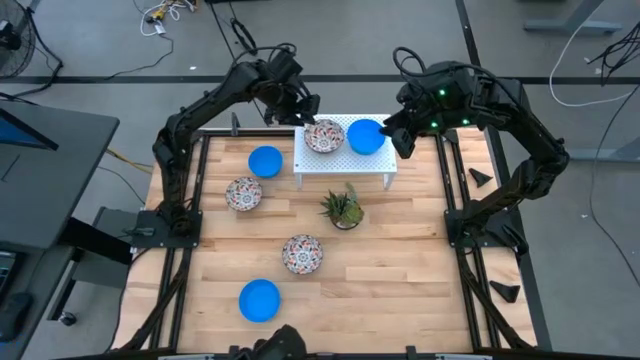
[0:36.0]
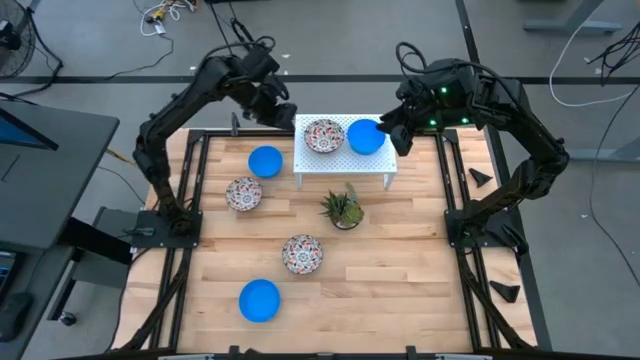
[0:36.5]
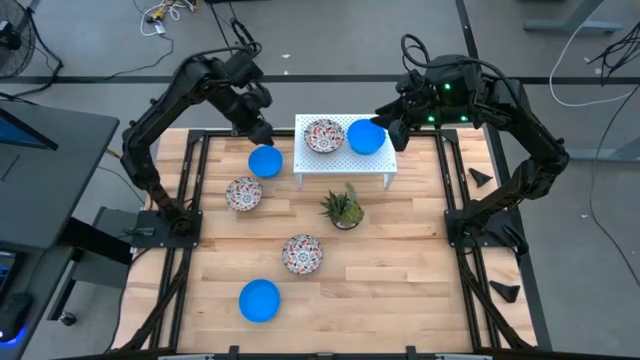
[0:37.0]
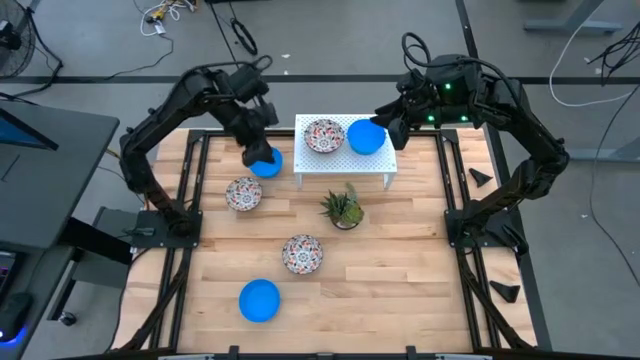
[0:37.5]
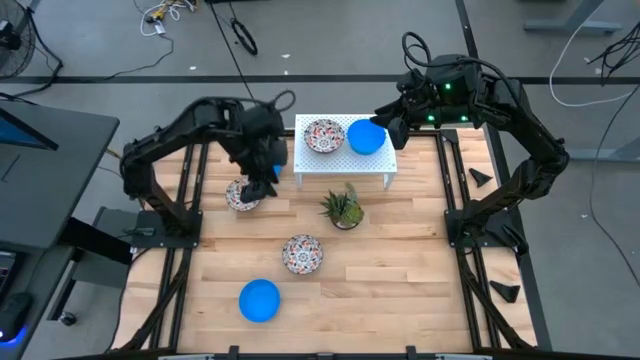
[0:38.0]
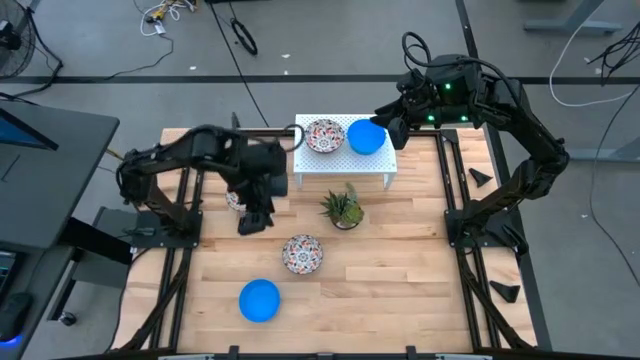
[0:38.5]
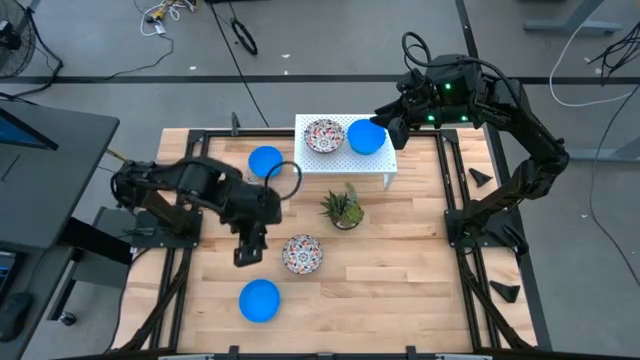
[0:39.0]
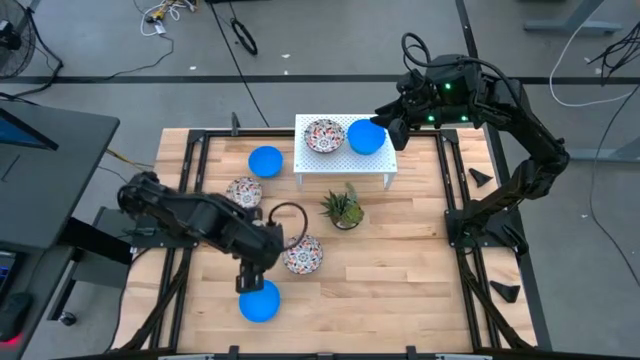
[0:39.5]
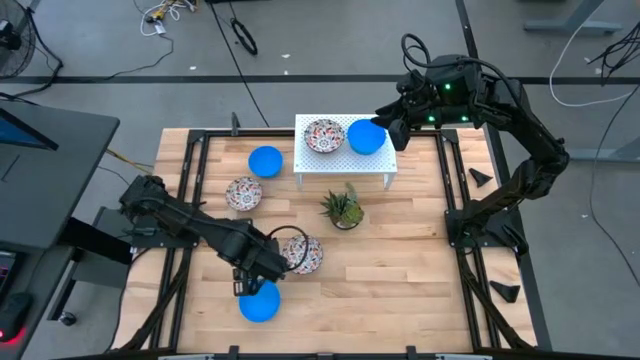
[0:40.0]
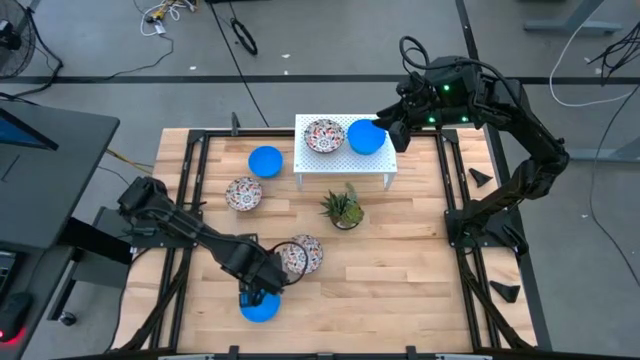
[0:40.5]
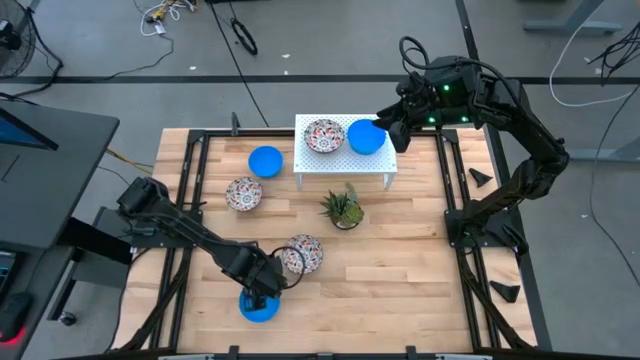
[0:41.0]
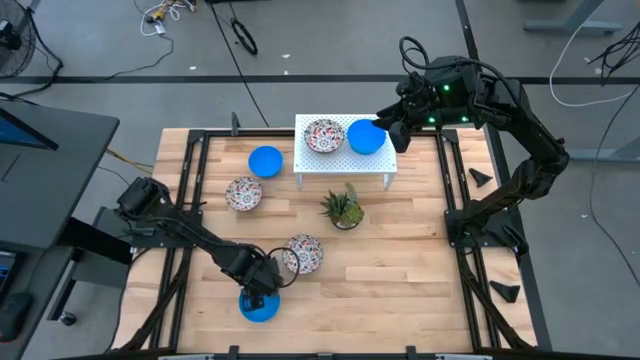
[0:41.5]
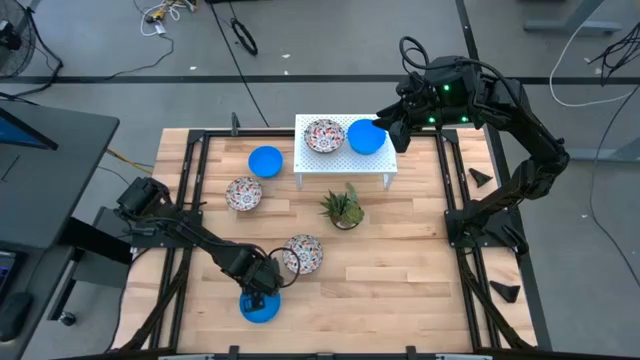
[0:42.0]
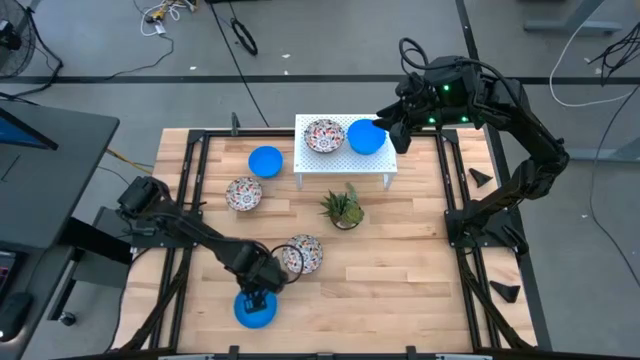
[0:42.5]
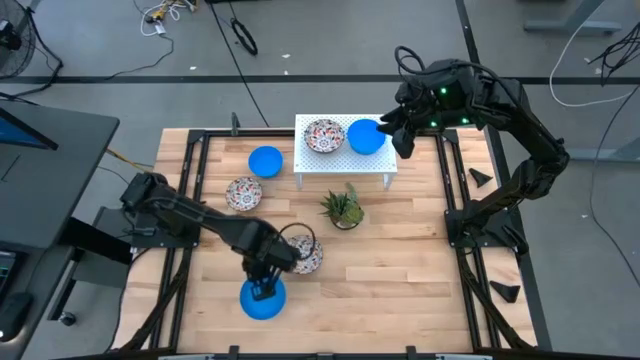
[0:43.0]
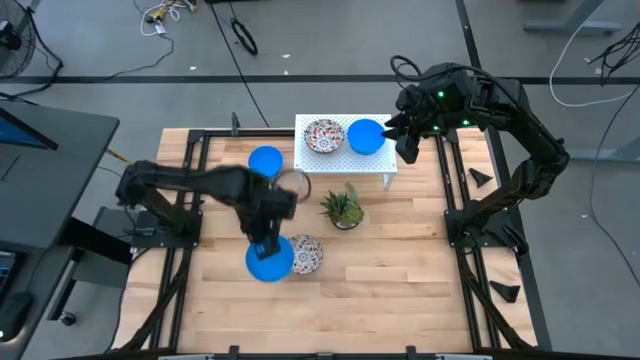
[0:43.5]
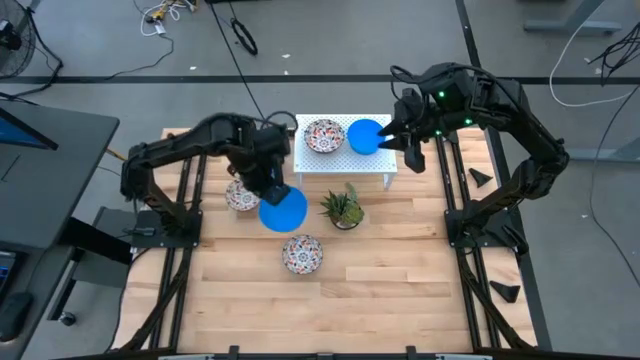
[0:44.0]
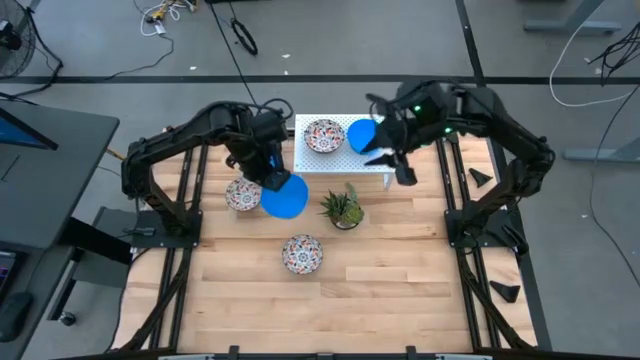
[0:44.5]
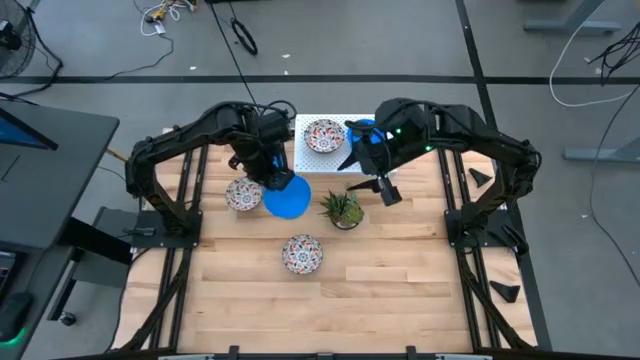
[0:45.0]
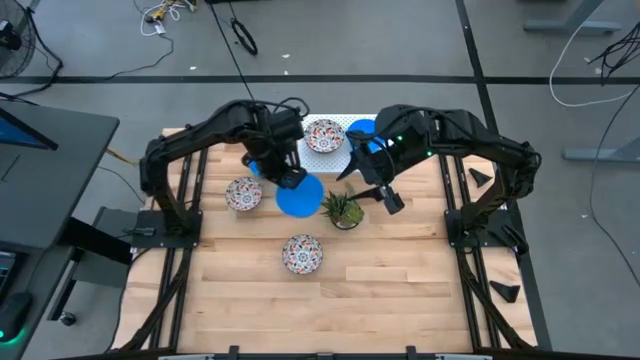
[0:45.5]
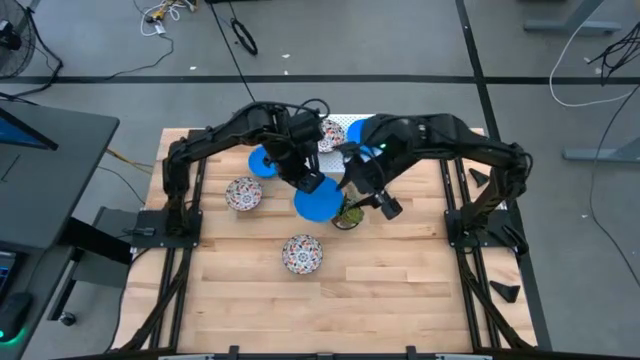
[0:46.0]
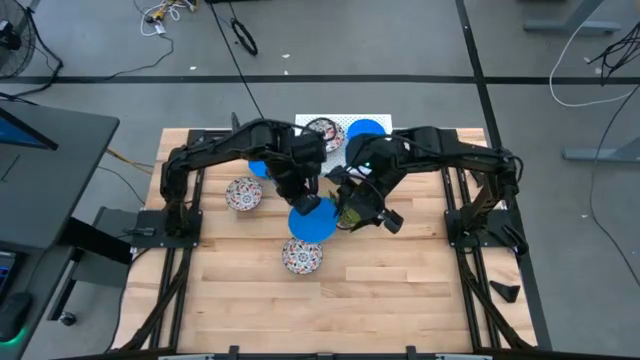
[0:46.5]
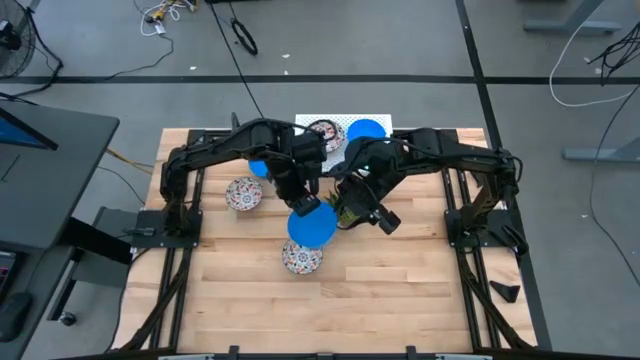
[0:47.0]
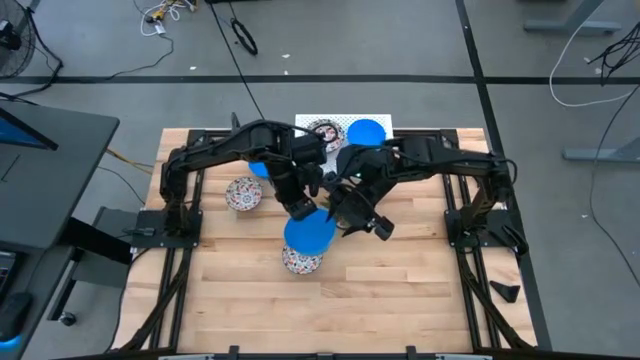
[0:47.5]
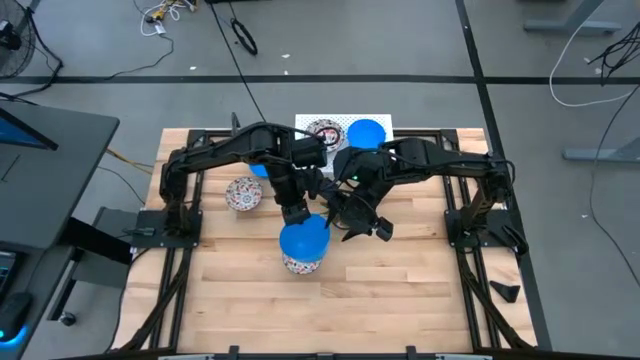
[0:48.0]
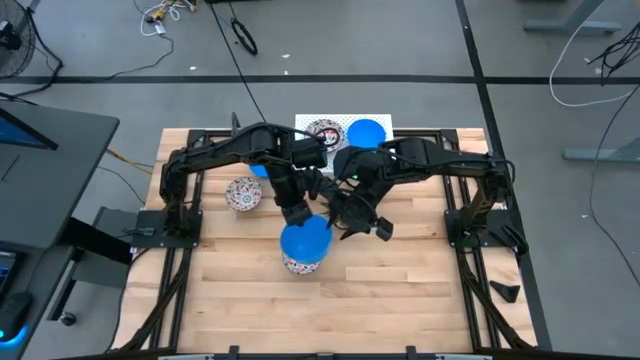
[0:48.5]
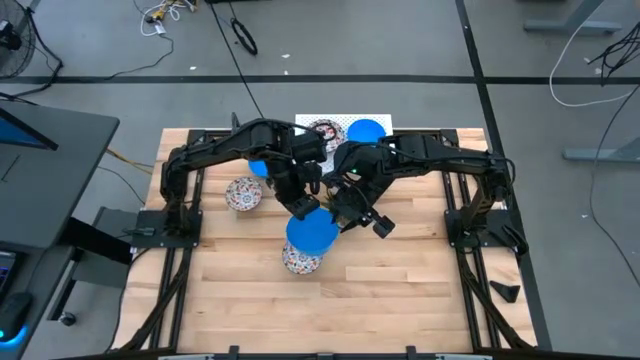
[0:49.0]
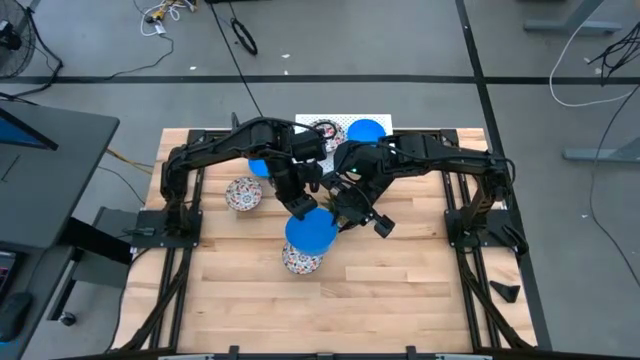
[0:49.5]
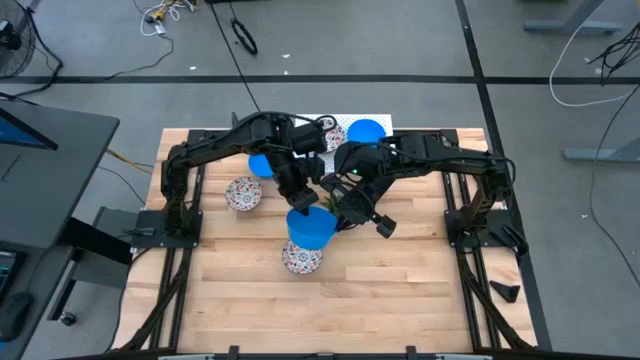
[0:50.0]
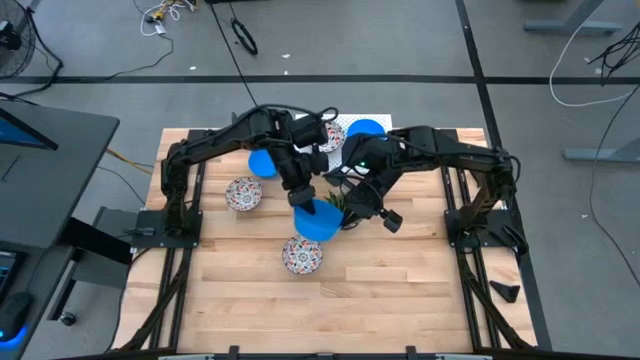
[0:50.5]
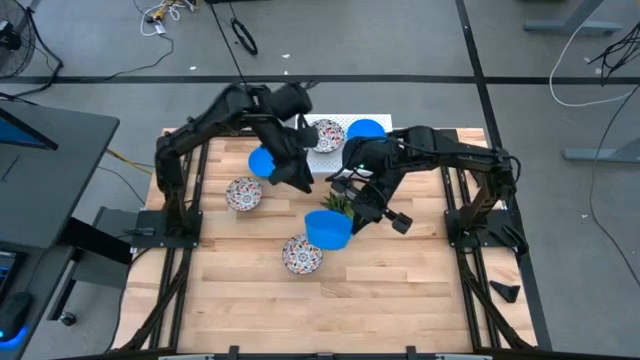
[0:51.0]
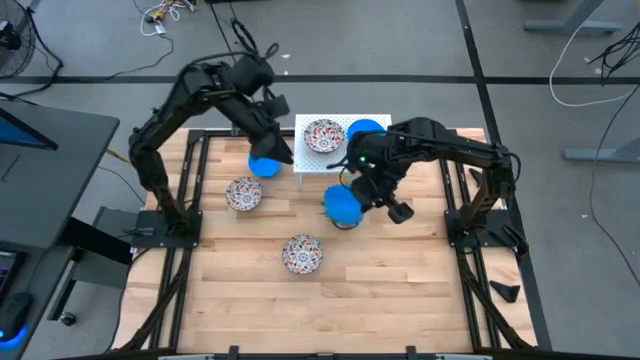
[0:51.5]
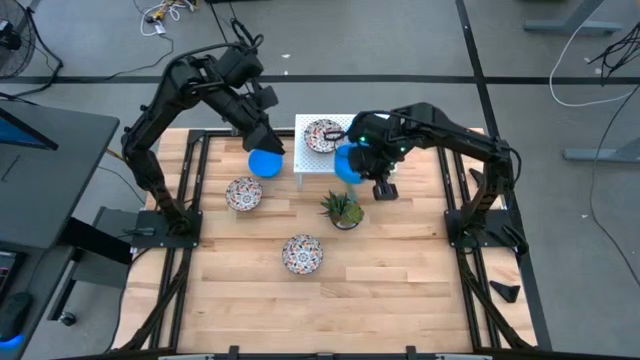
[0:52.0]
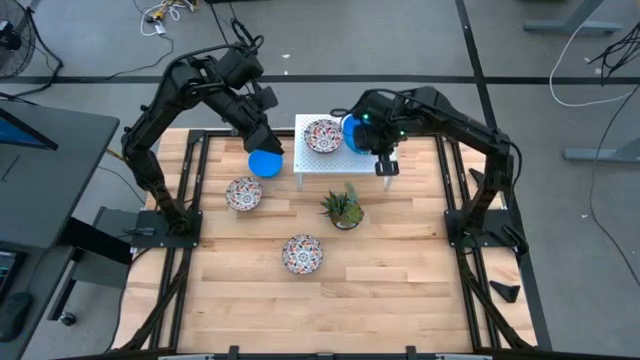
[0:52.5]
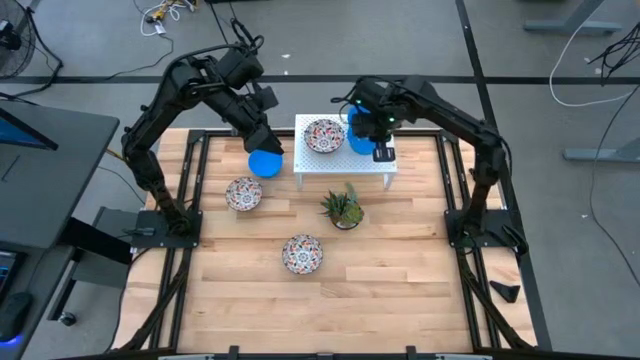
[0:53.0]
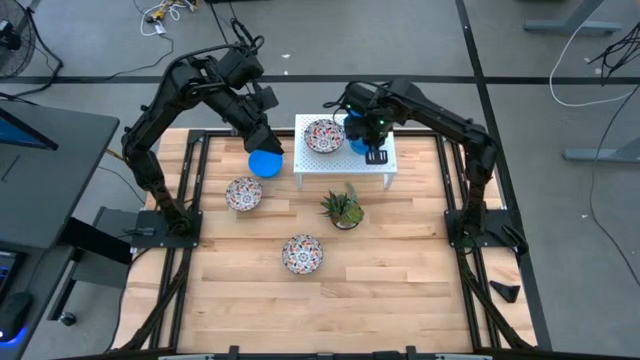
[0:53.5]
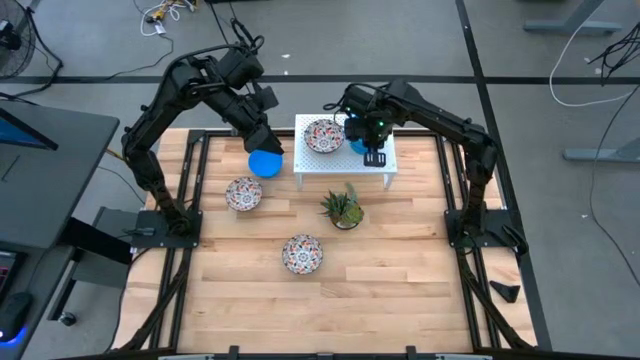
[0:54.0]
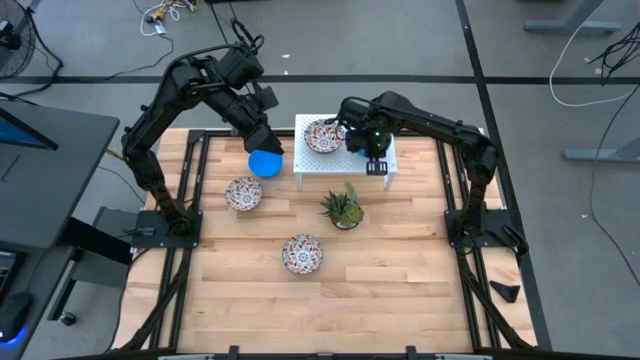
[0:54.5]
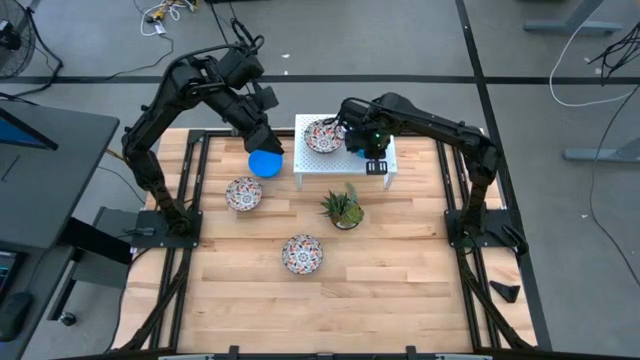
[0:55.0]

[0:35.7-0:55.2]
Task: Pick & Place Mini bowls
Stack the bottom blue bowl on the blue bowl on the shelf
